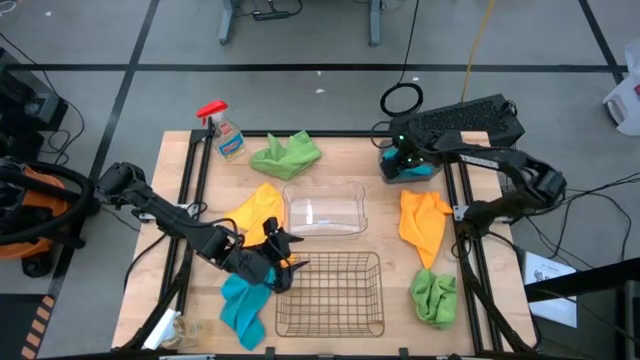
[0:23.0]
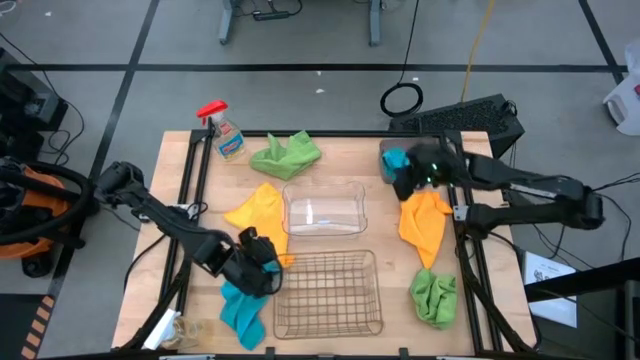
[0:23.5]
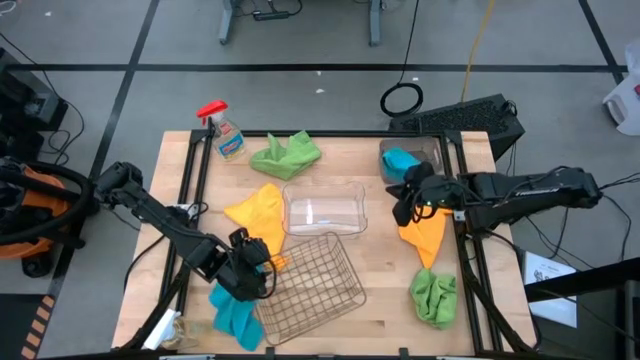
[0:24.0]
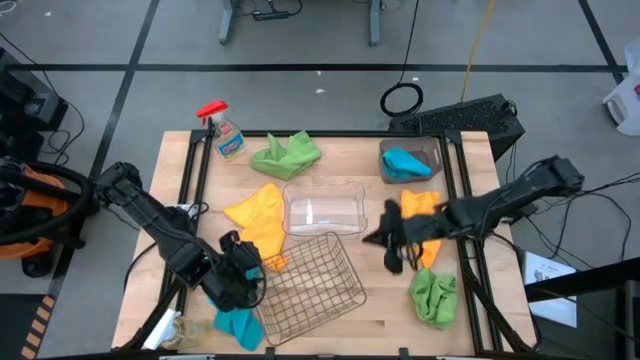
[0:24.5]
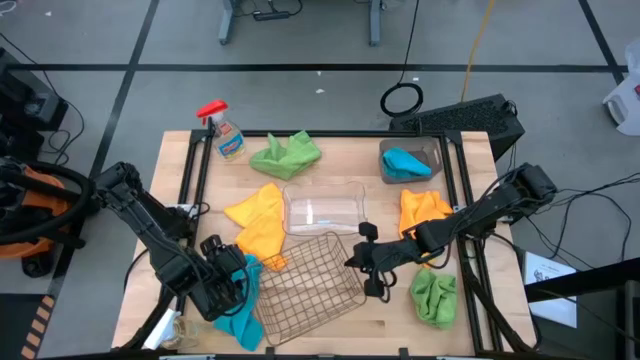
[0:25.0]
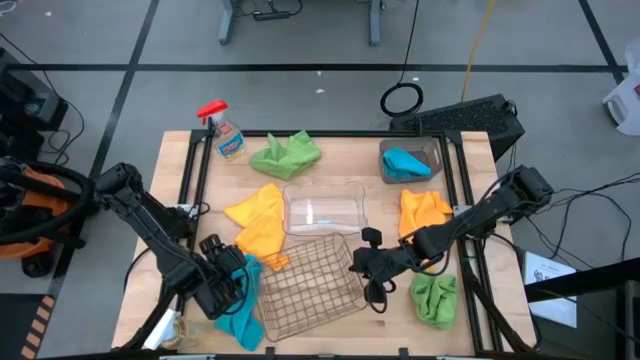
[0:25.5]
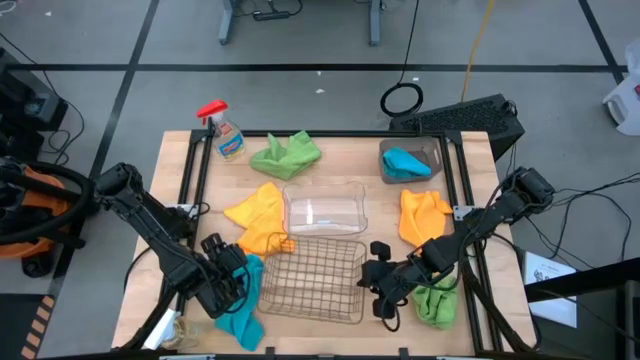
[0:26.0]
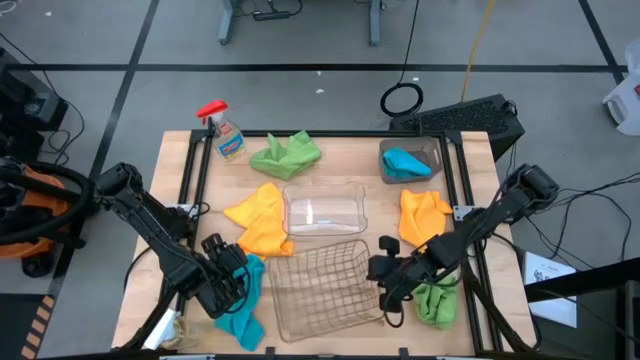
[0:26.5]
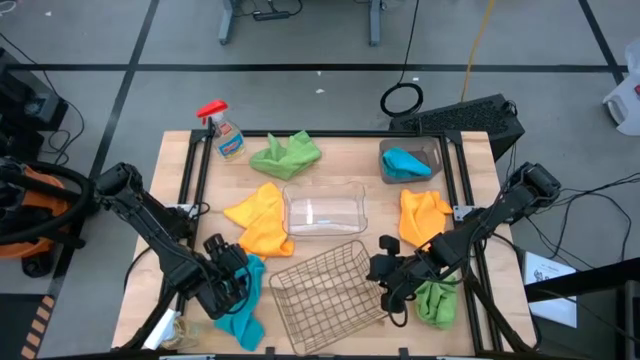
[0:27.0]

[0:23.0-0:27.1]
Task: Sort microfiber towel by color & place in baskets
Adjust the golden wire basket

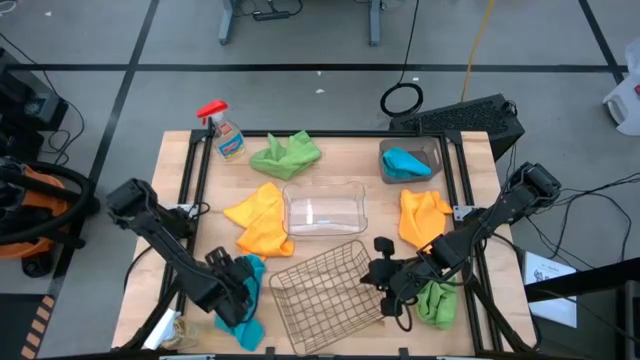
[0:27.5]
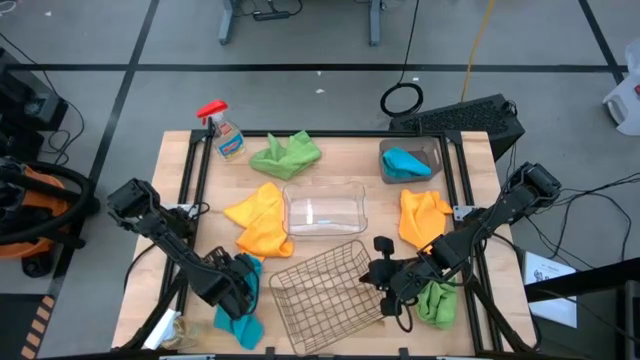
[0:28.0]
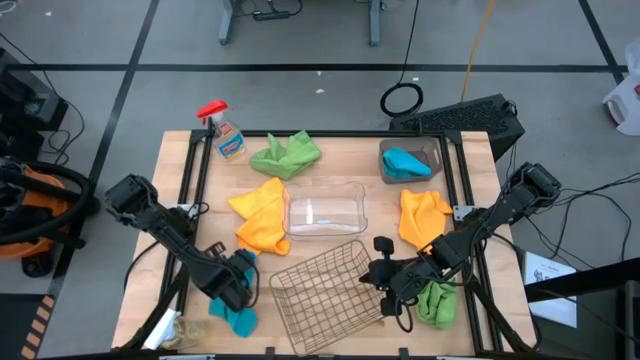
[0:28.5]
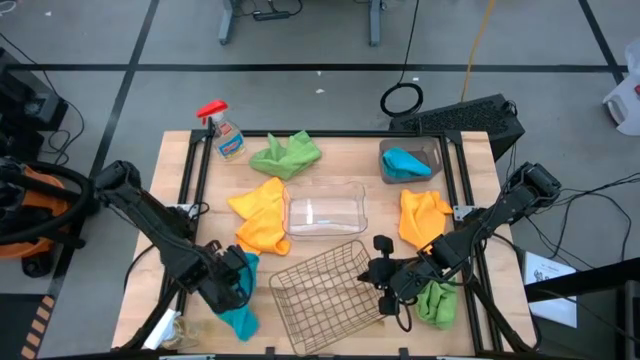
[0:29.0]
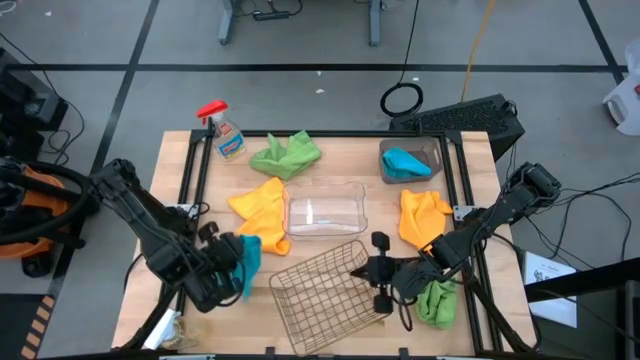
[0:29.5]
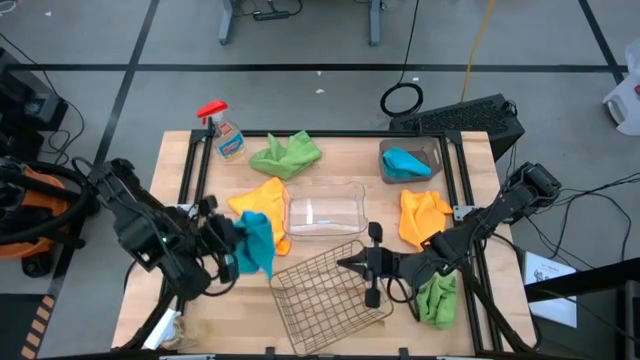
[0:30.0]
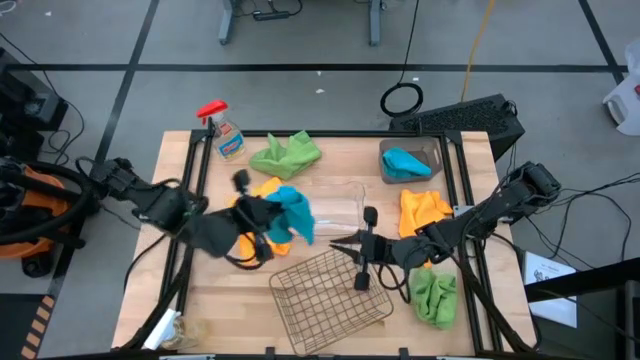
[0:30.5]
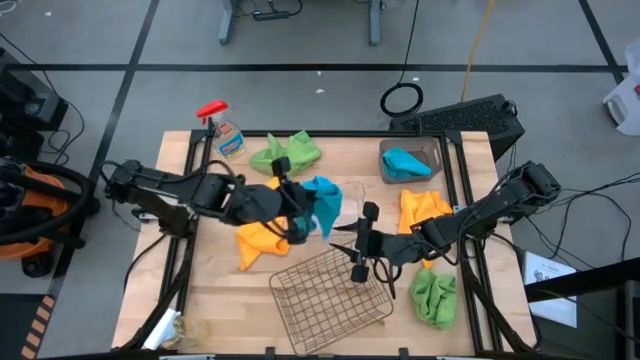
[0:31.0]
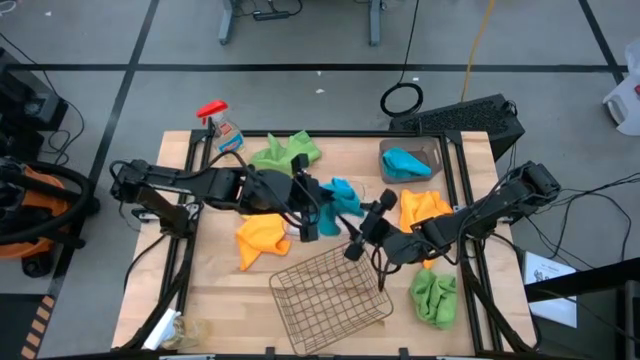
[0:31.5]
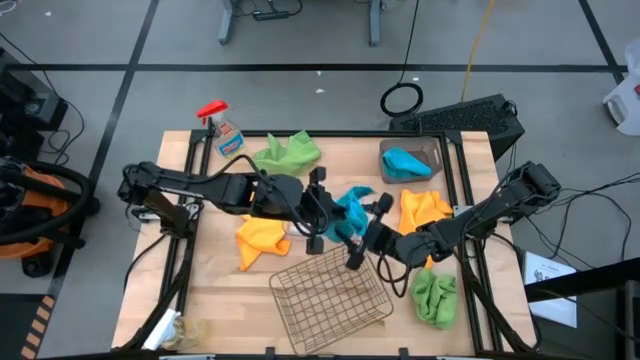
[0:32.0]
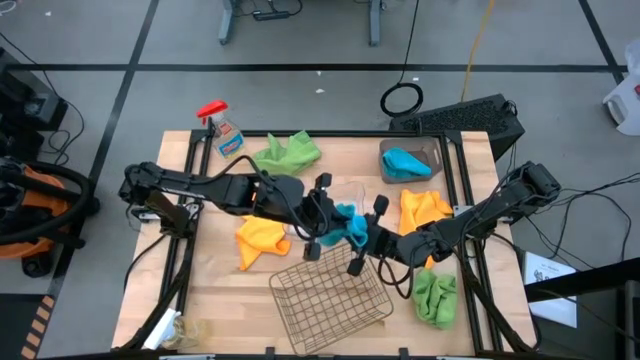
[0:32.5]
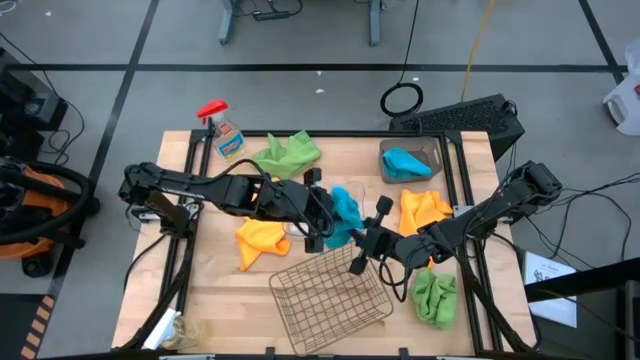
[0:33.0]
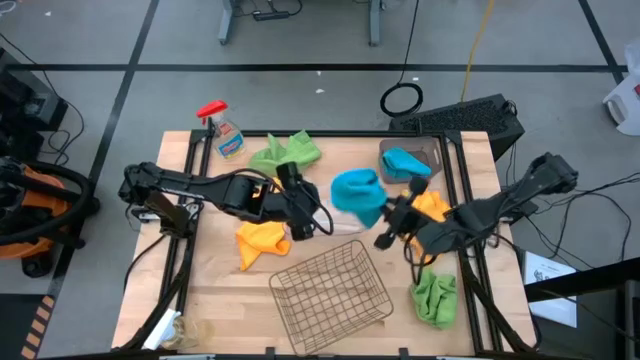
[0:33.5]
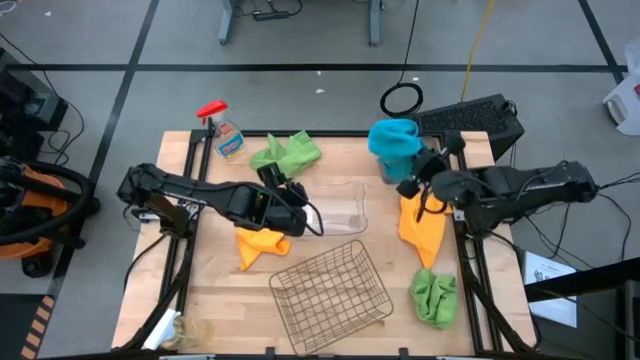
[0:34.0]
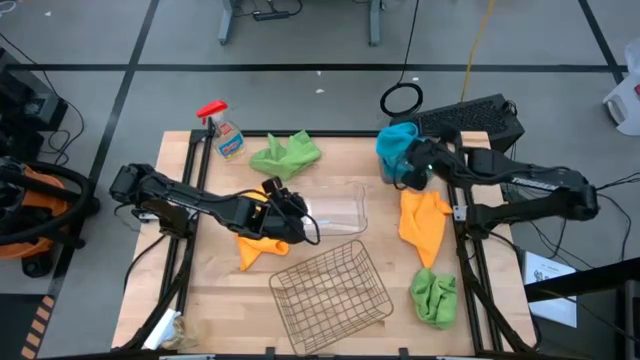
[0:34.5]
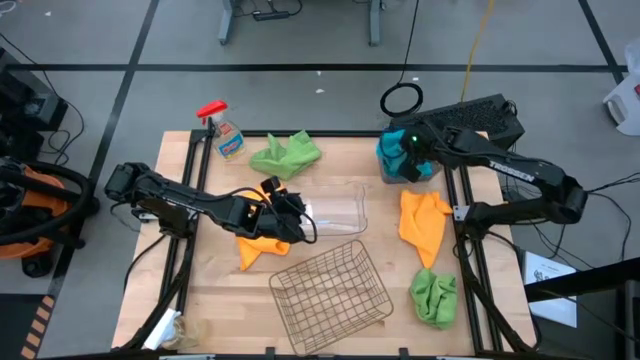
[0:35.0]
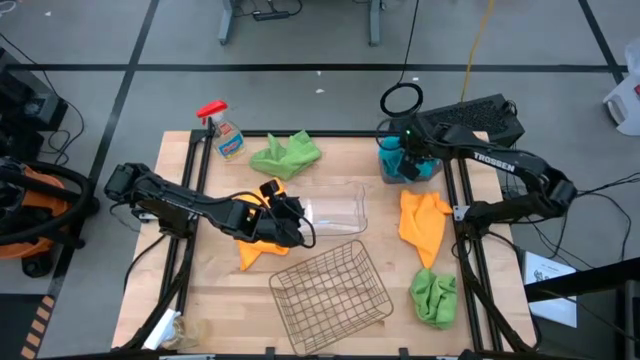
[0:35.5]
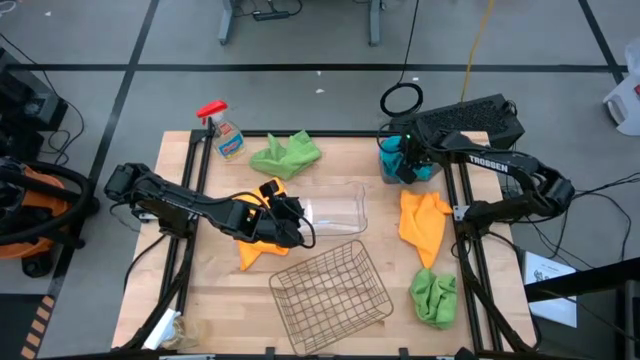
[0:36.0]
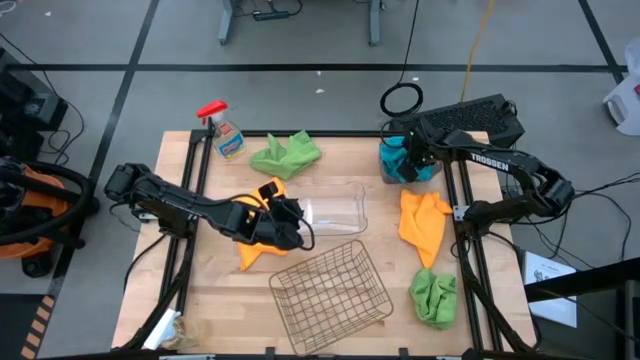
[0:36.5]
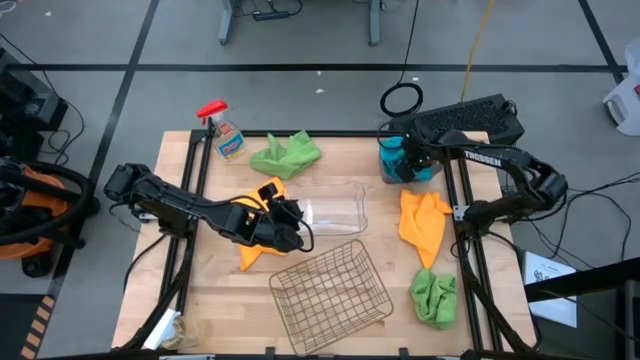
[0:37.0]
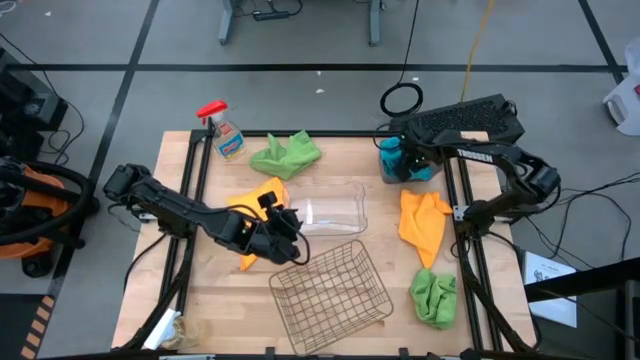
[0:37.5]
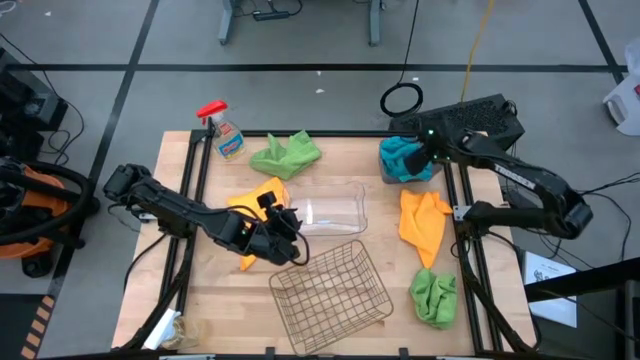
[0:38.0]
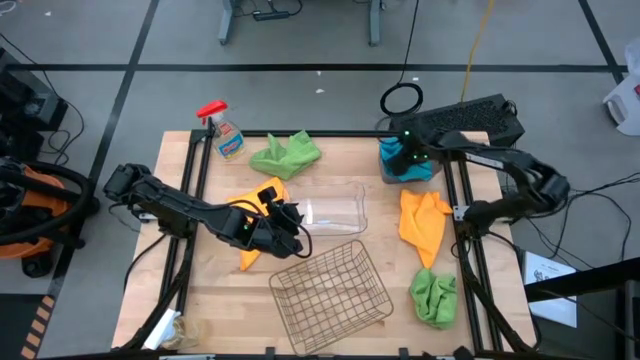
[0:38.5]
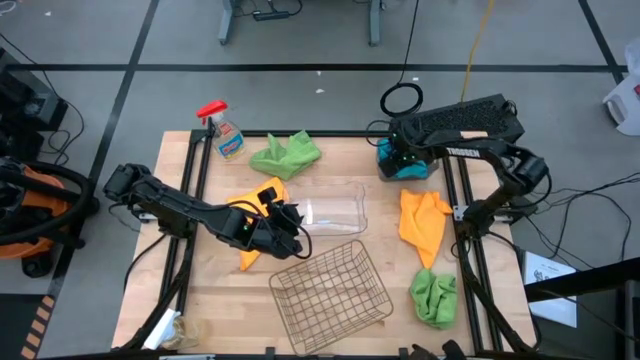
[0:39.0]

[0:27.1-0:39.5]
Put the blue microfiber cloth into the transparent black bin

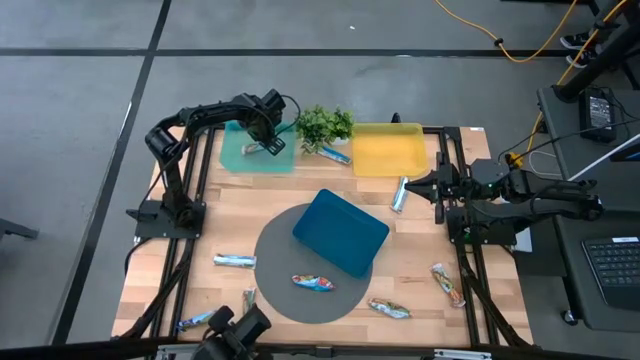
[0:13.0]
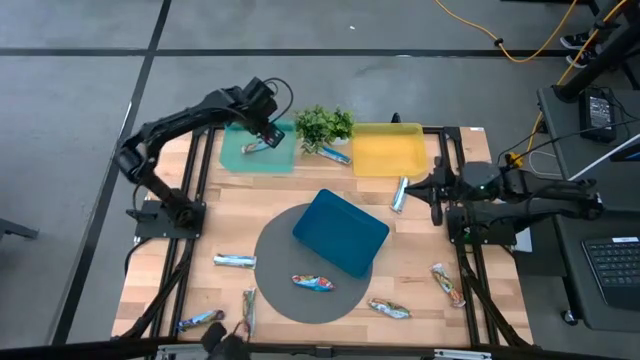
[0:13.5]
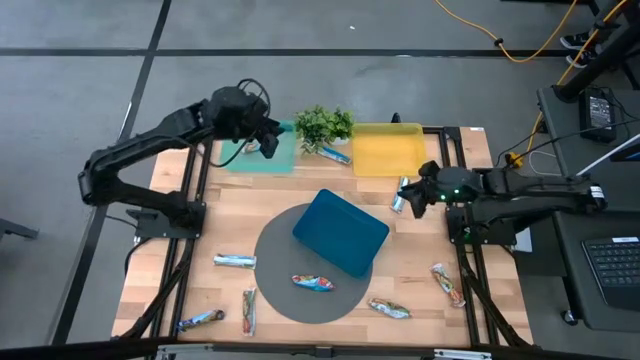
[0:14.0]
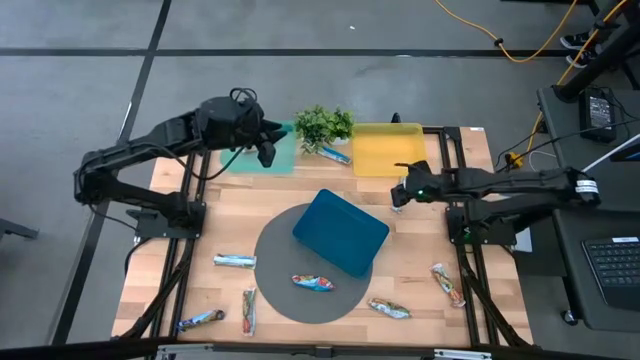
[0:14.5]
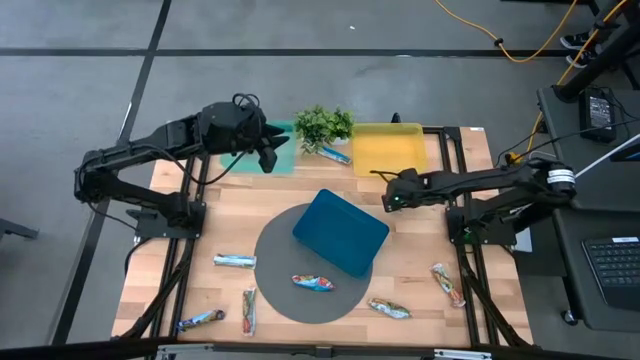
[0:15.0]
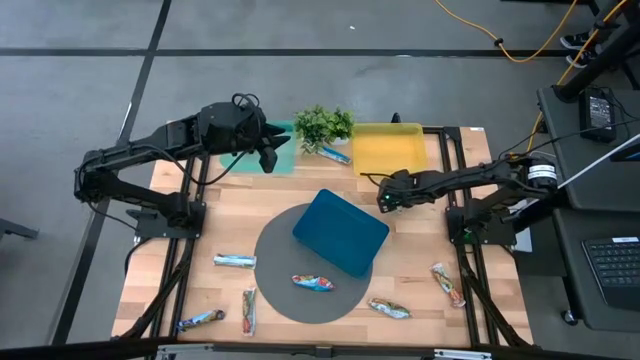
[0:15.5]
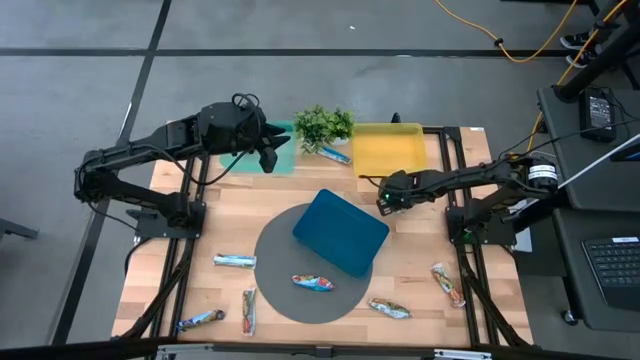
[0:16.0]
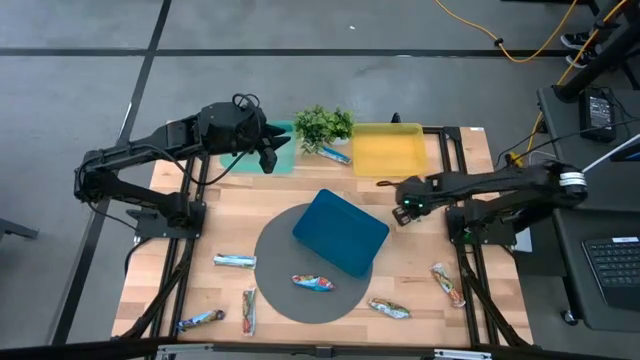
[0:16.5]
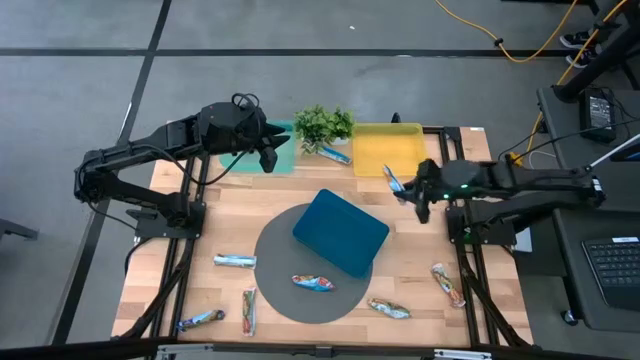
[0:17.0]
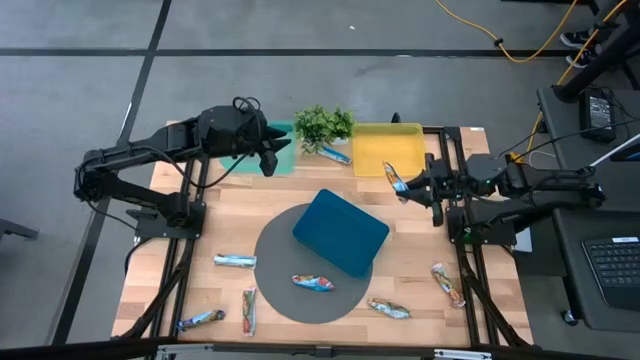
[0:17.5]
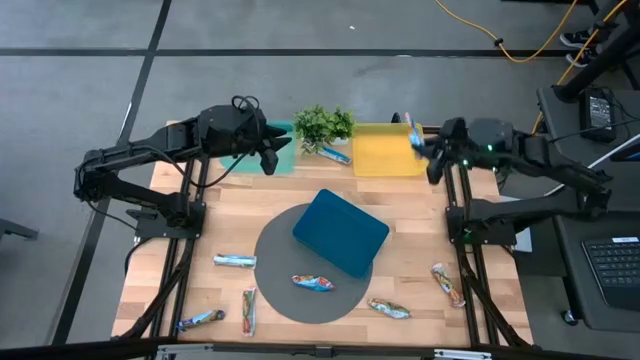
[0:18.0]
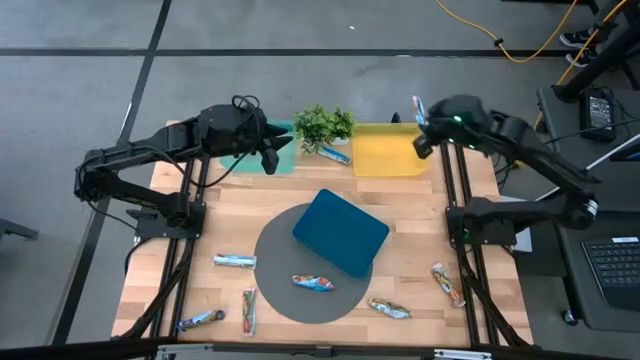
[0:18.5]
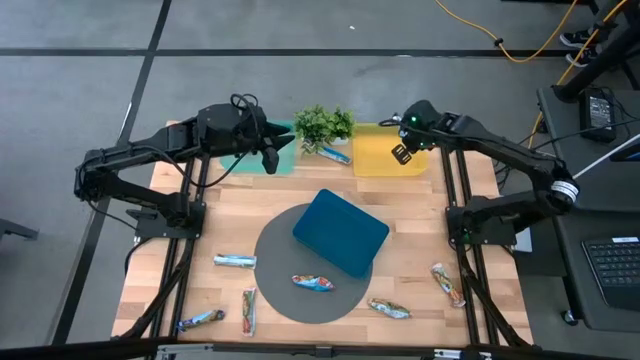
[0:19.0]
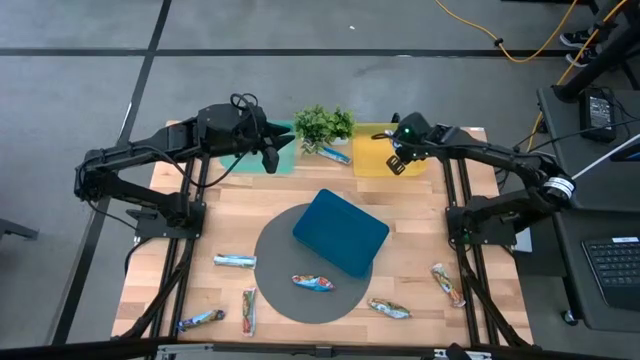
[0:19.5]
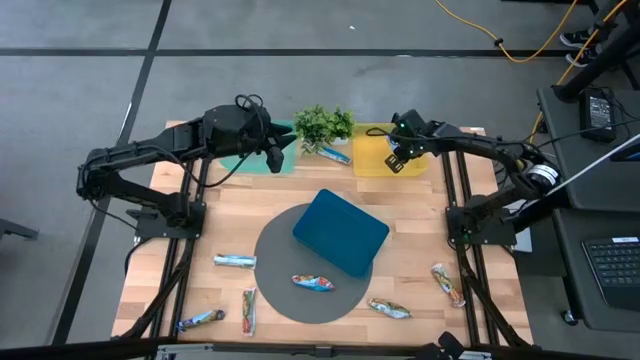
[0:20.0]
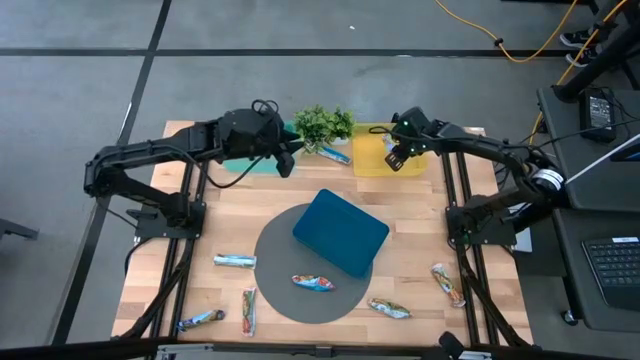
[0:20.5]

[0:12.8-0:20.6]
Task: Pick and place Granola Bars by type
Put the top yellow granola bar into the yellow bin
